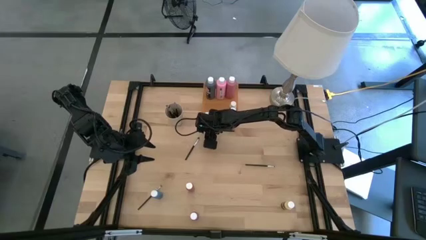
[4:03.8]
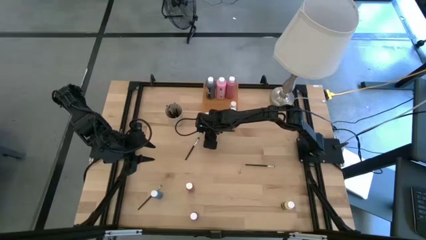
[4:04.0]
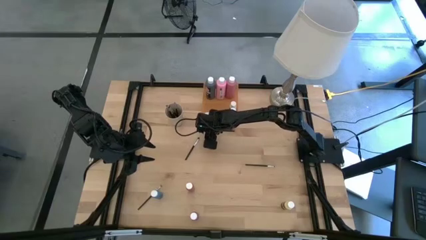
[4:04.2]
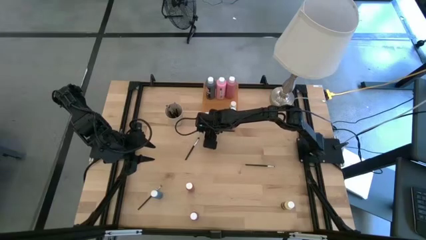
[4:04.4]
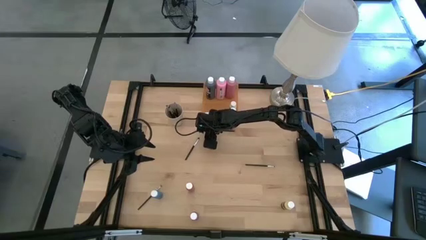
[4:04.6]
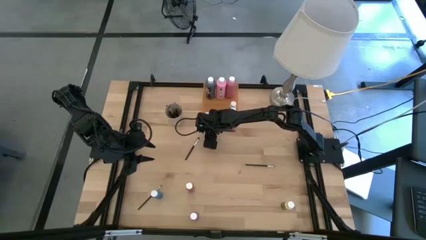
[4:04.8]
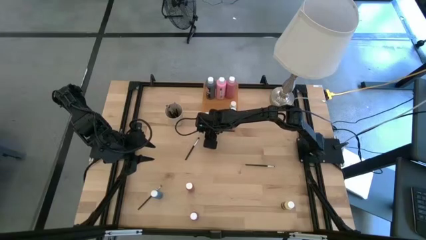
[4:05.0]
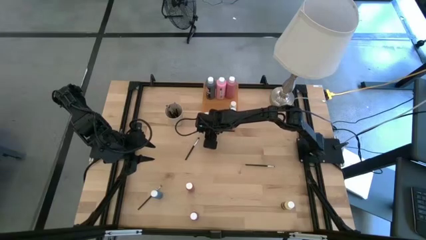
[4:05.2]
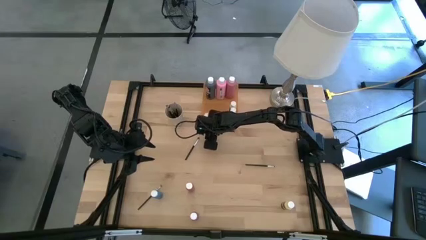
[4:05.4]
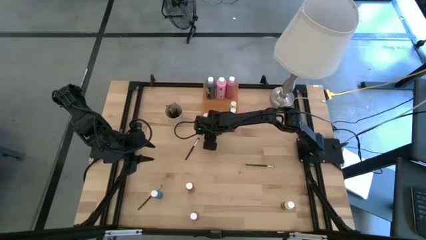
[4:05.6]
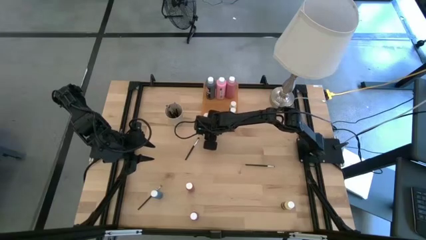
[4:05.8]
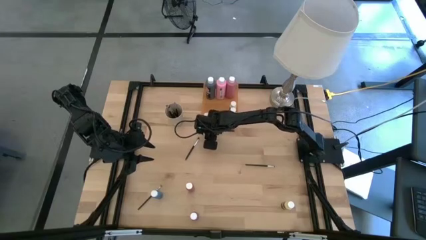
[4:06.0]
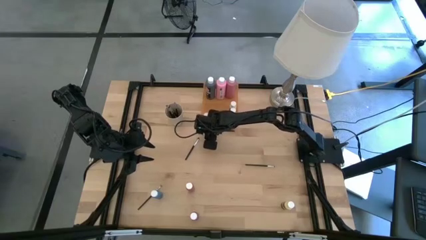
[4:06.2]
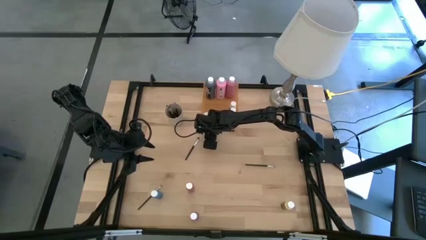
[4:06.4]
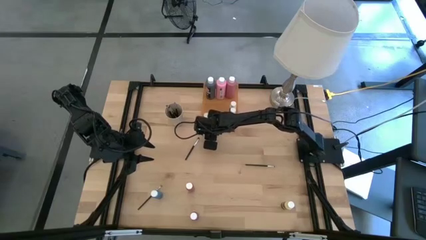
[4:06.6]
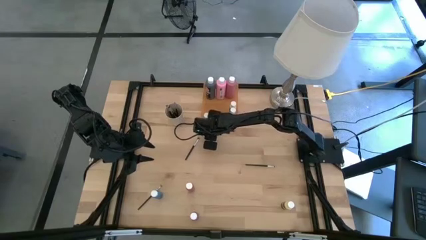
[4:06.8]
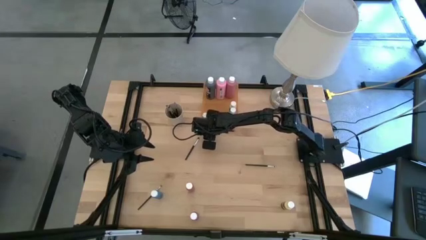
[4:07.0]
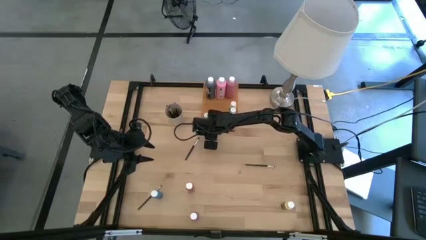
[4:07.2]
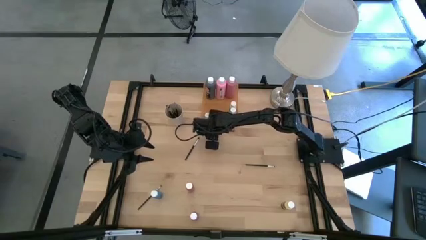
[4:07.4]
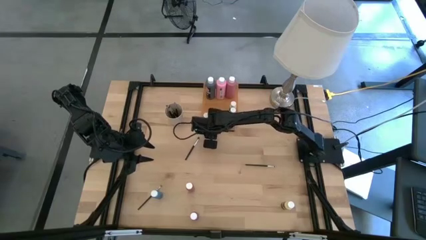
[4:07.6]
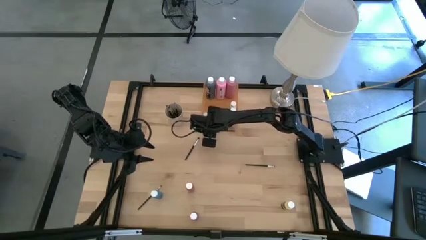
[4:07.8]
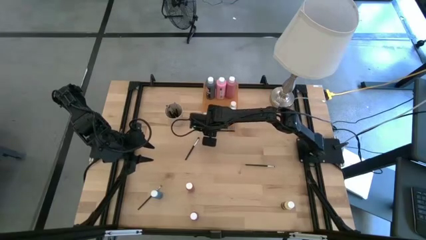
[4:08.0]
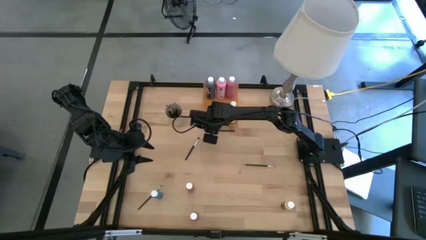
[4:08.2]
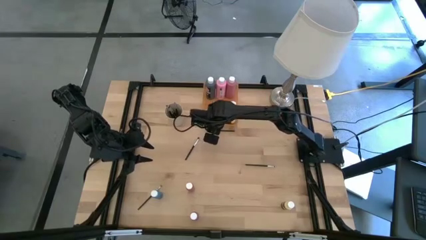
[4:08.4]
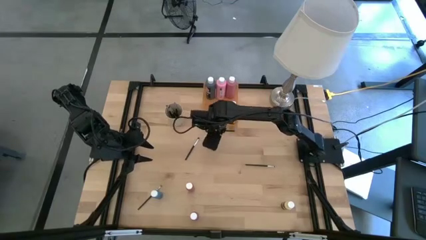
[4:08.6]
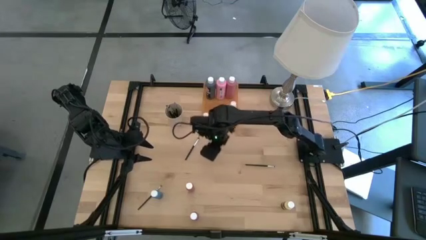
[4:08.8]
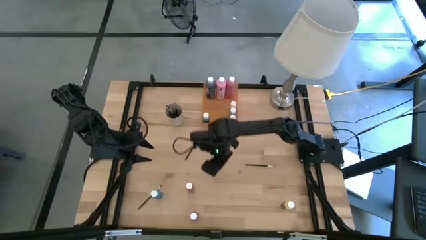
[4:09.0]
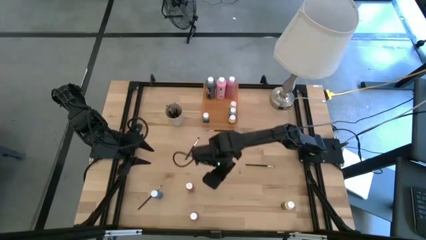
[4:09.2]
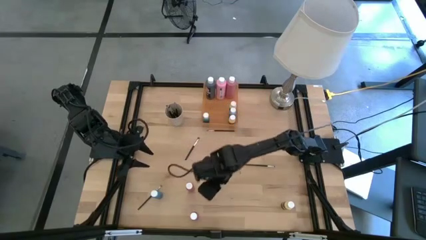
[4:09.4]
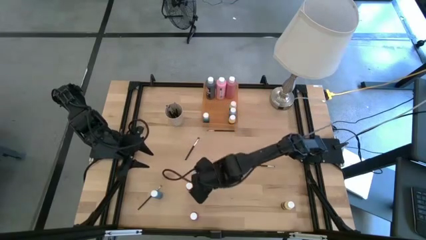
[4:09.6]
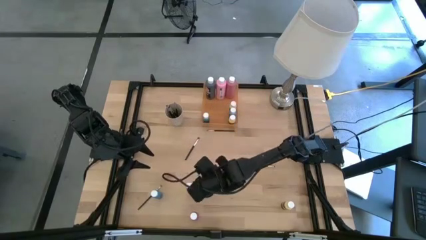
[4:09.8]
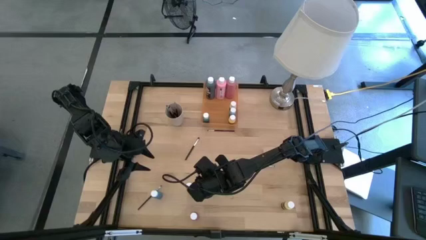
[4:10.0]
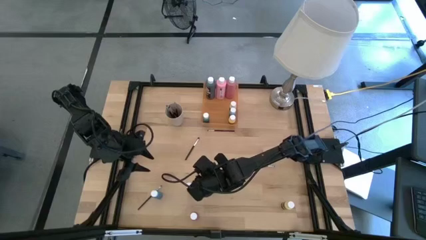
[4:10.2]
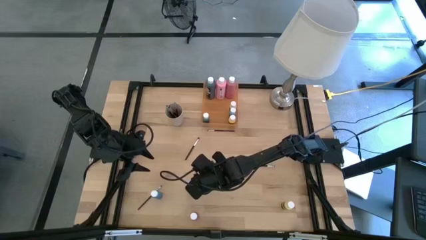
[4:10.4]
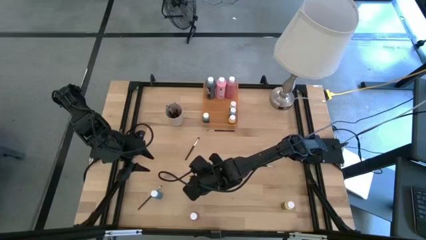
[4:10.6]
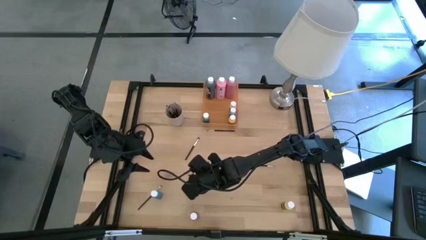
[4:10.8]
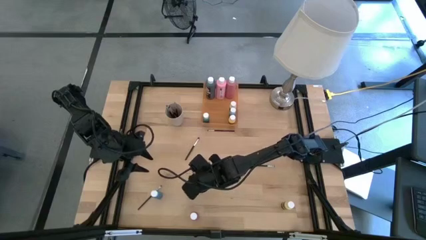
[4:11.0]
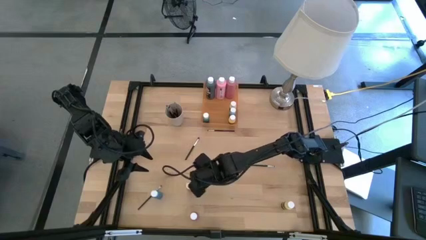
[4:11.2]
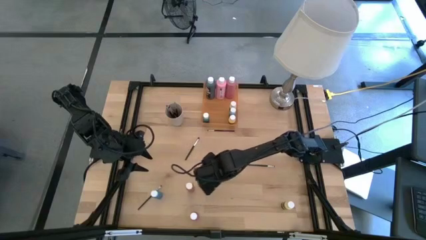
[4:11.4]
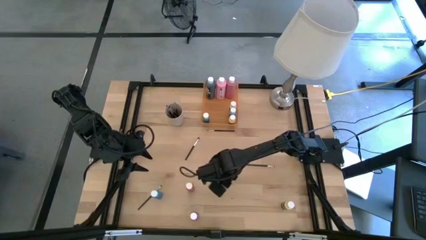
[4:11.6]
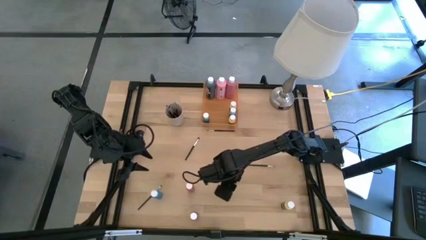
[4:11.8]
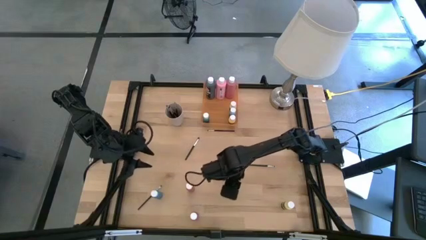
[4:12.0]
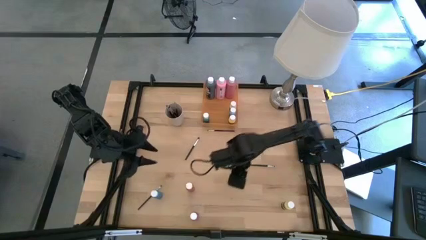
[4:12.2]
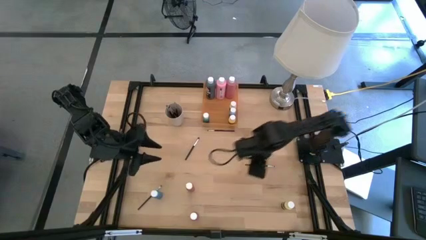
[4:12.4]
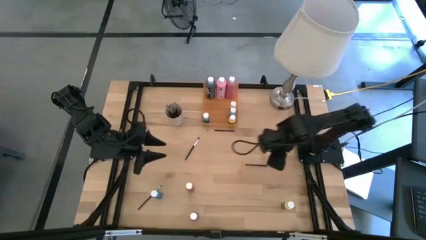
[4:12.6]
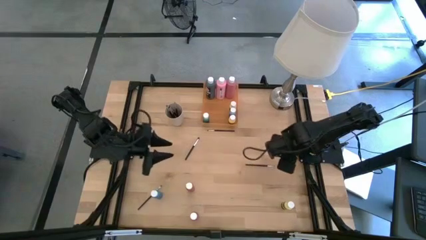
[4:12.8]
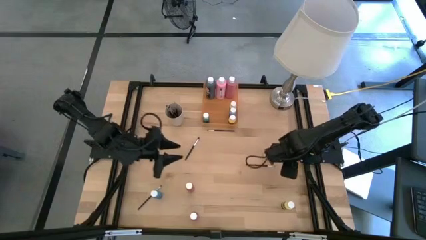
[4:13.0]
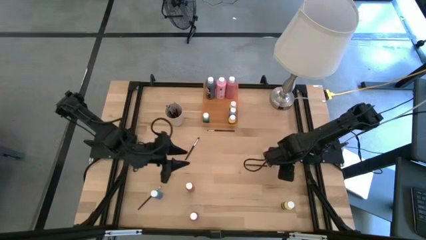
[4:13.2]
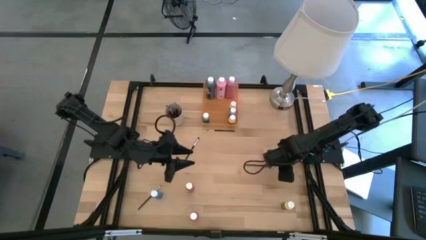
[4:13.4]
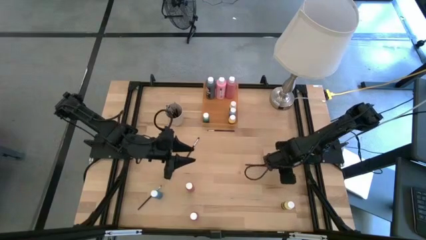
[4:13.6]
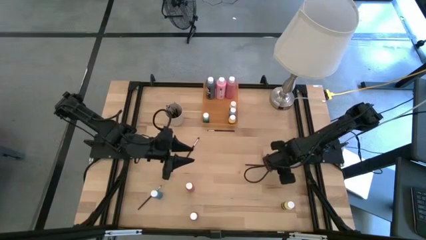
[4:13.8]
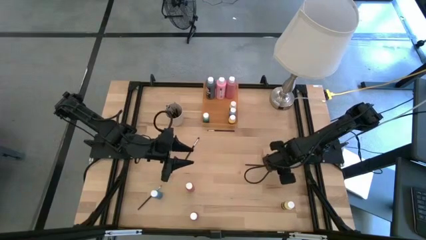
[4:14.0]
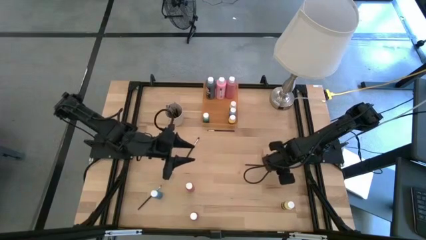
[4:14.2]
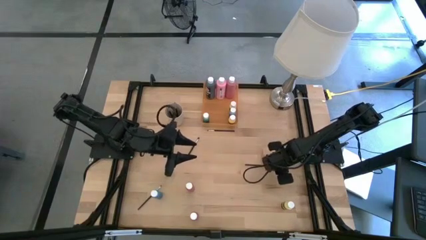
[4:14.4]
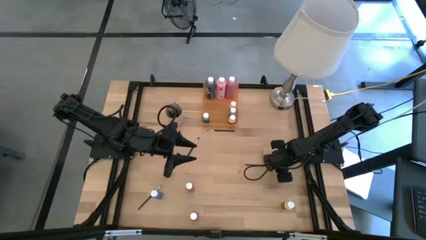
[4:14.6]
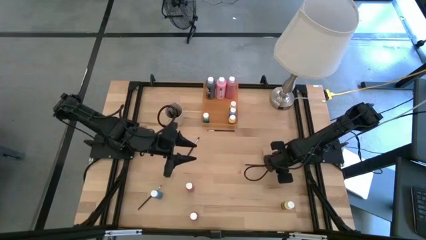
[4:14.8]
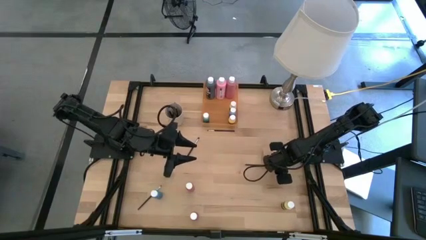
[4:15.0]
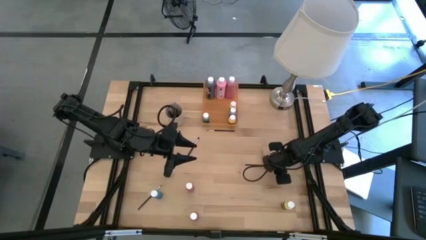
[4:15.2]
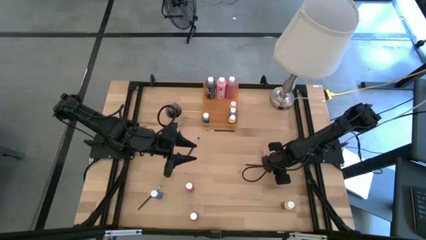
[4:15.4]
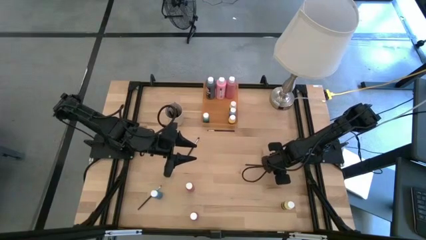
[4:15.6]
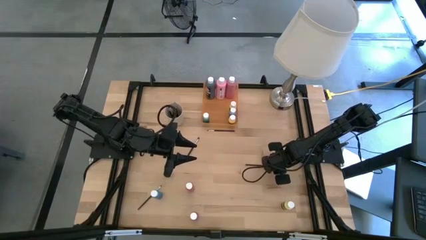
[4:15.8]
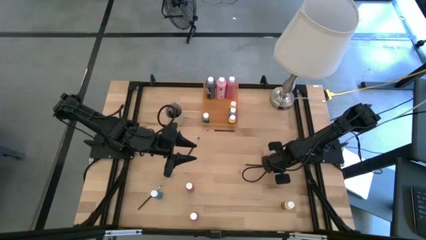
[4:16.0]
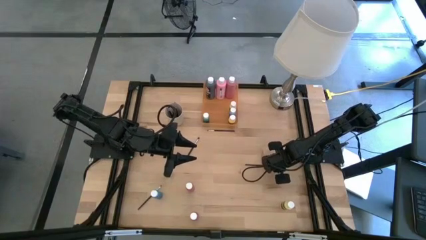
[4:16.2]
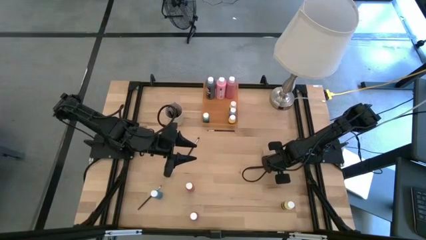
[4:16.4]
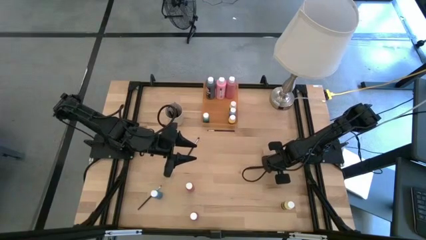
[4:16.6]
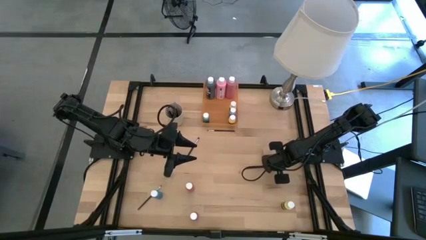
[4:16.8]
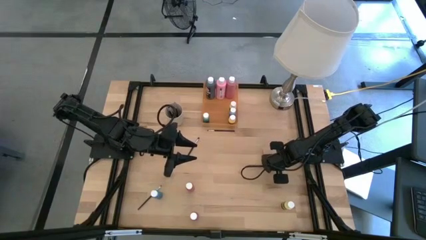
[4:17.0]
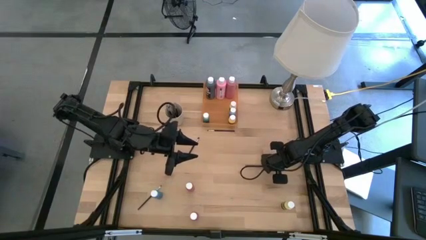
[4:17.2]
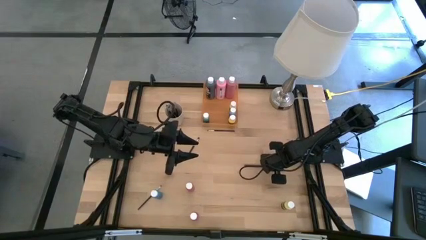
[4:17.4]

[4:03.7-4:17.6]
Task: Pick & Place Paint Supplies
Put the black paint brush into the white cup

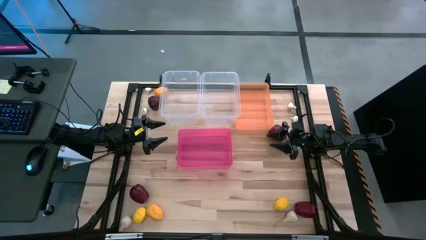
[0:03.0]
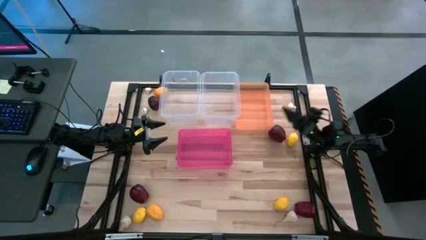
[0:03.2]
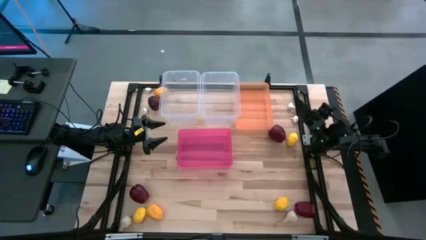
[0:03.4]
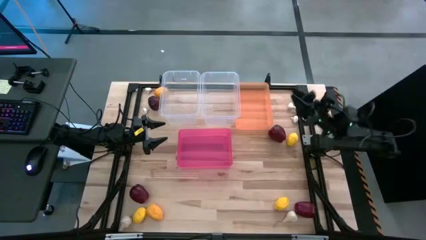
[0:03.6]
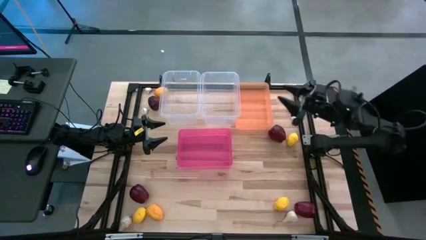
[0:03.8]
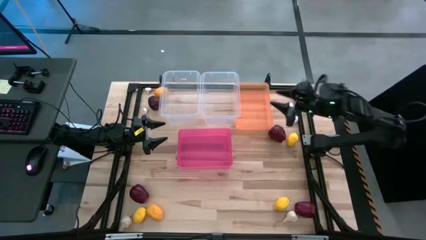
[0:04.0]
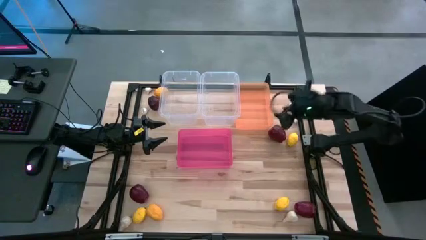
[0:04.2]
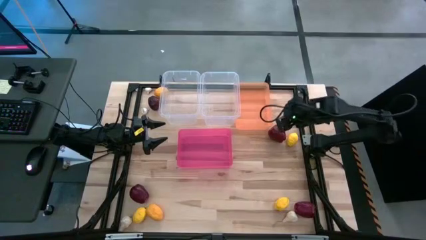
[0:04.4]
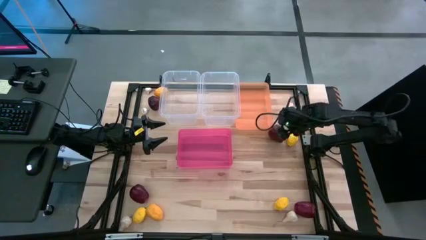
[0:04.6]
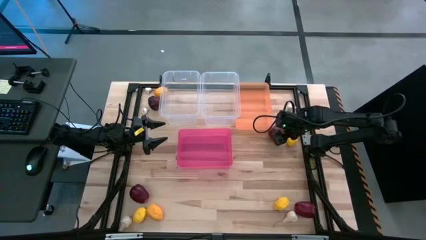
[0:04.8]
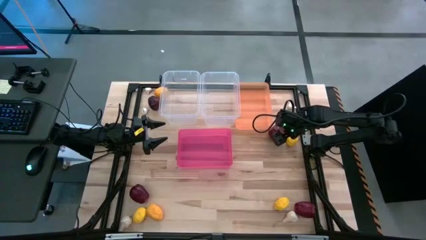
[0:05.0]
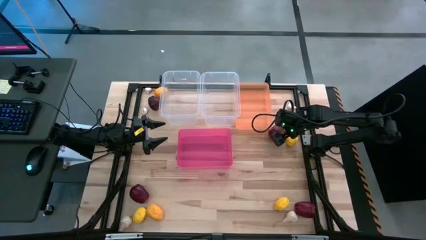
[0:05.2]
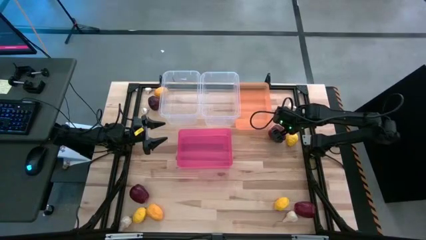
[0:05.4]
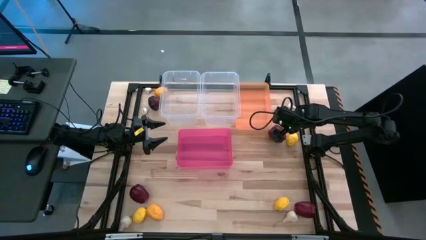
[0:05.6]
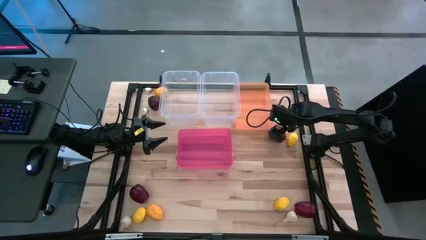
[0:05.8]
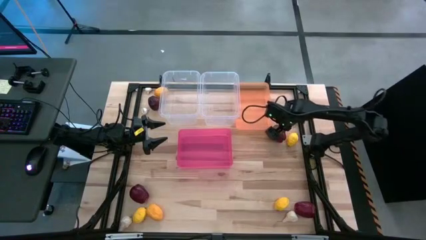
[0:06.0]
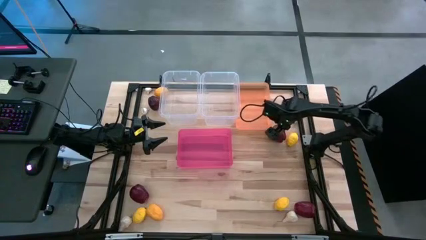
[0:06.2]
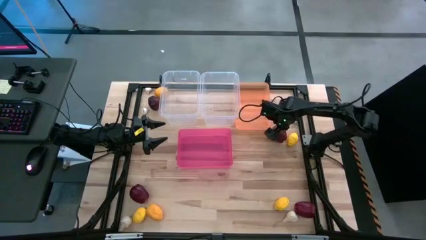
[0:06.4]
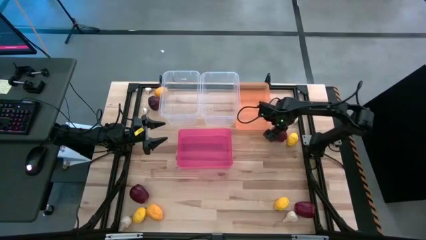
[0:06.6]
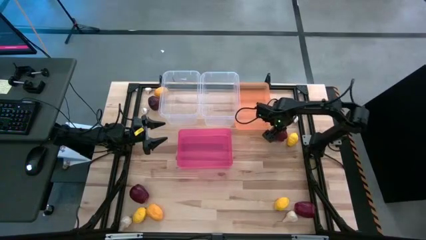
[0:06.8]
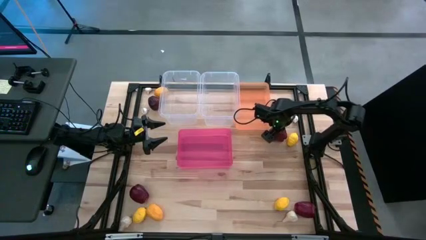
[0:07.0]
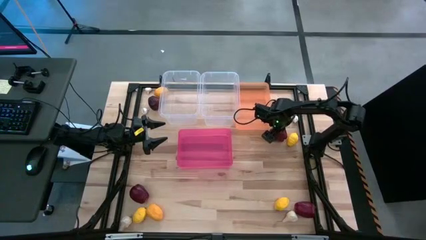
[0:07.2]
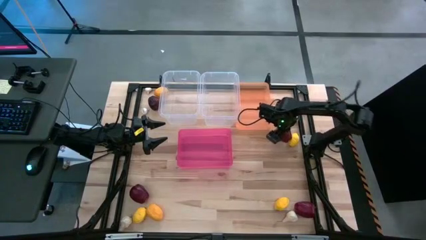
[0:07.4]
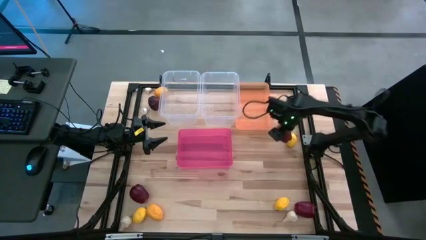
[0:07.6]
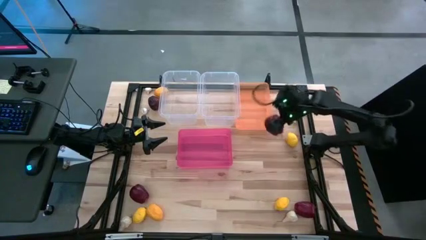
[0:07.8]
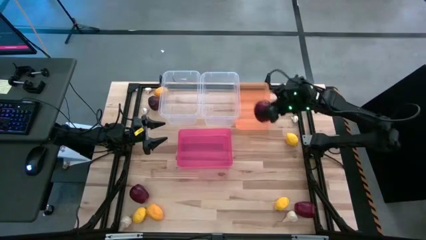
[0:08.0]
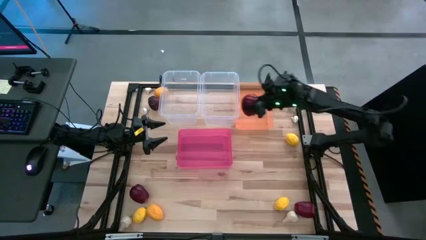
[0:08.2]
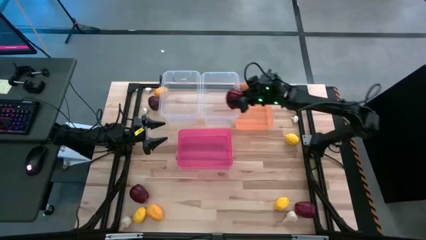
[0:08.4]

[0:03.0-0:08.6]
Task: Sort produce into baskets
Put the red apple into the right transparent bin
